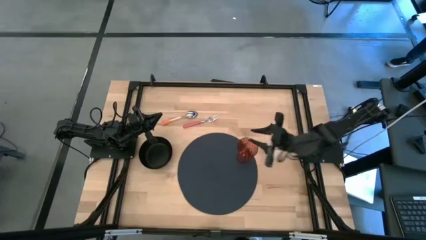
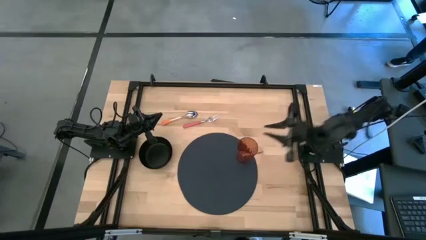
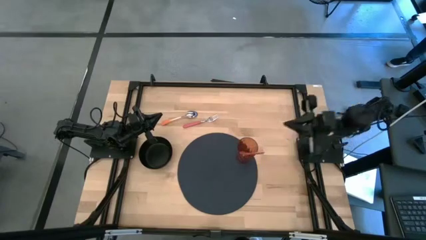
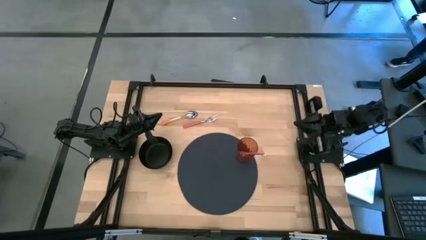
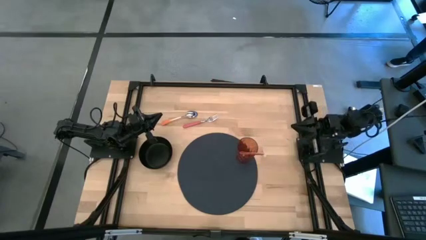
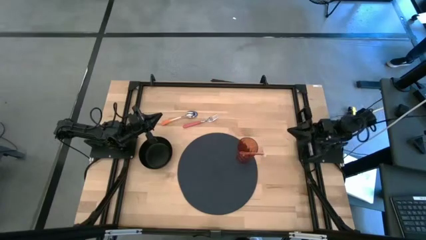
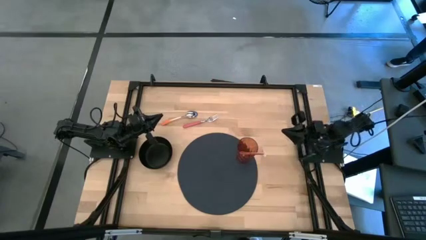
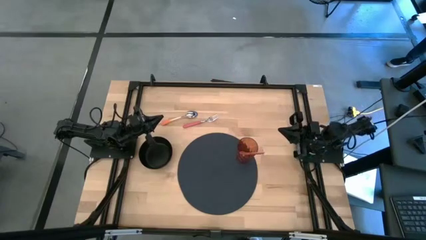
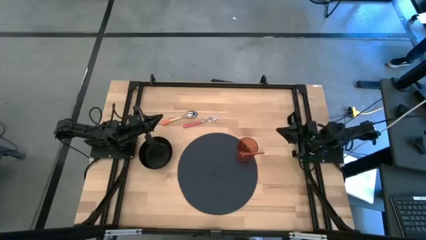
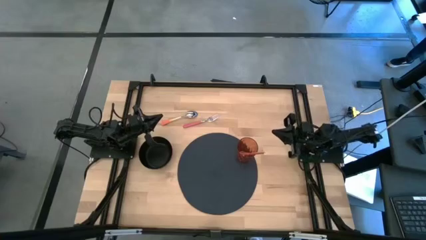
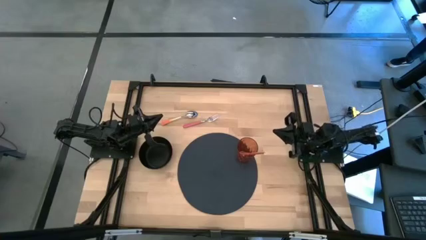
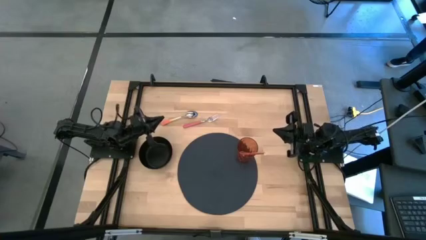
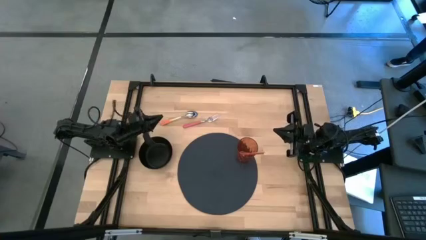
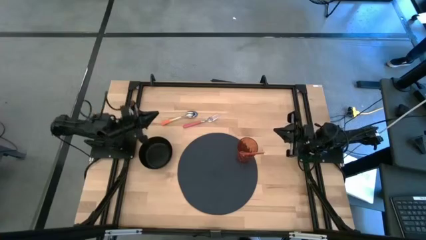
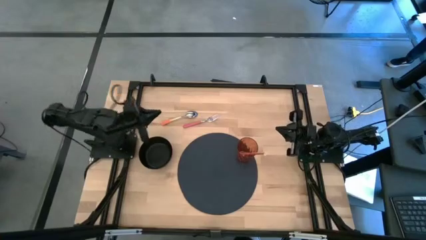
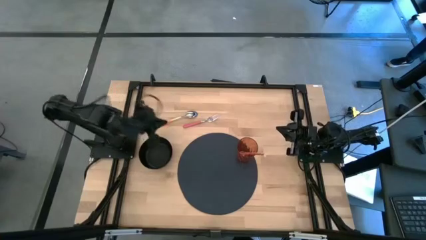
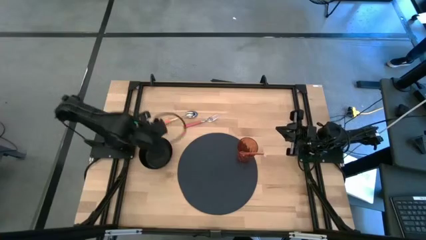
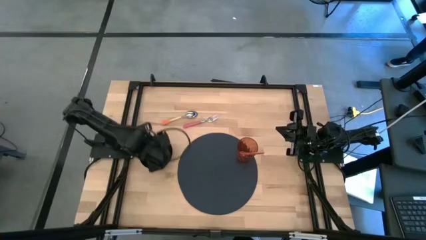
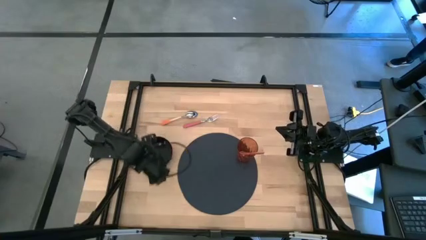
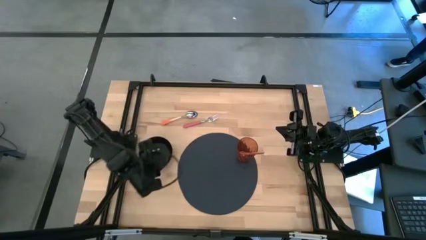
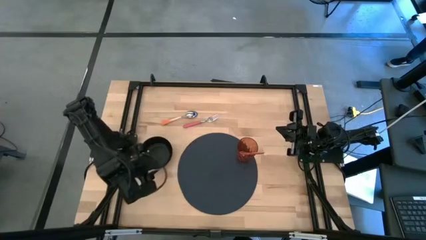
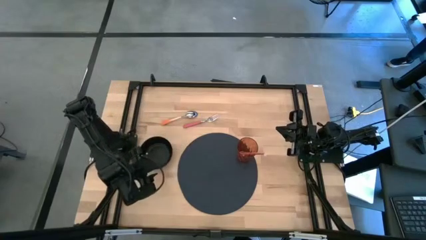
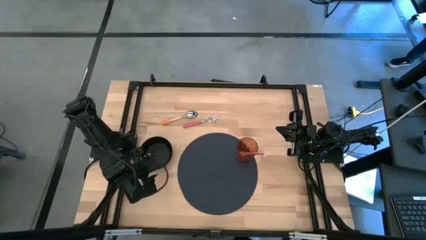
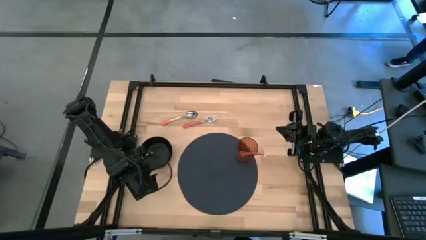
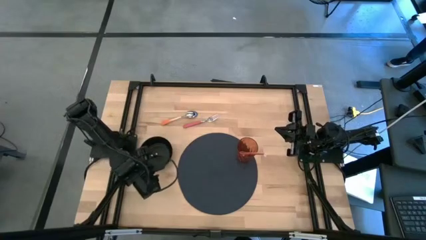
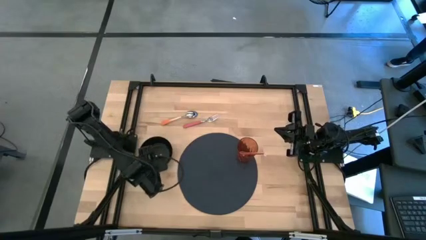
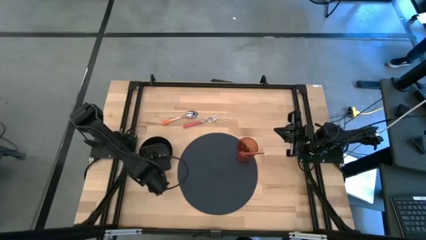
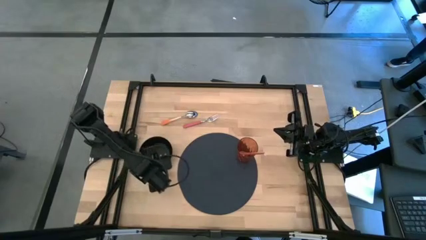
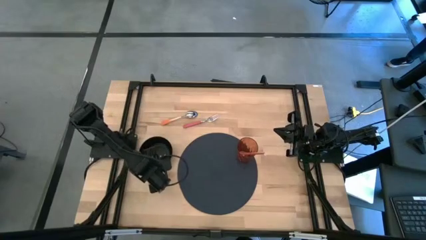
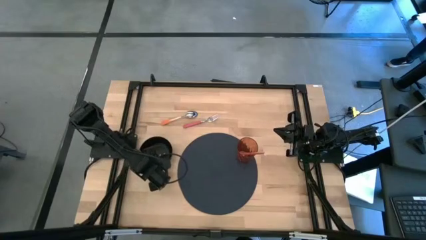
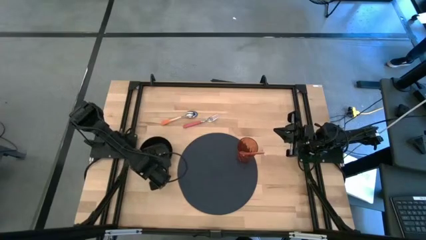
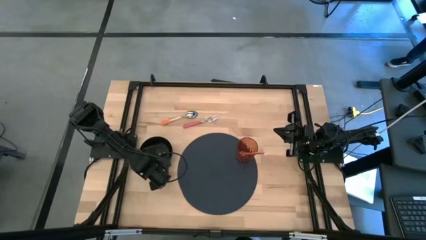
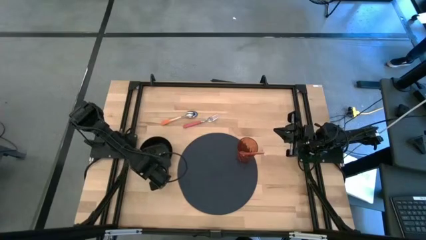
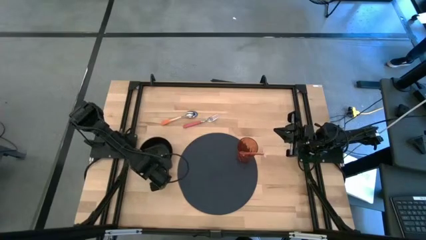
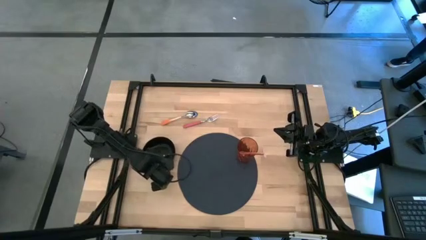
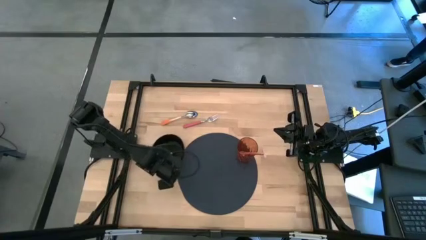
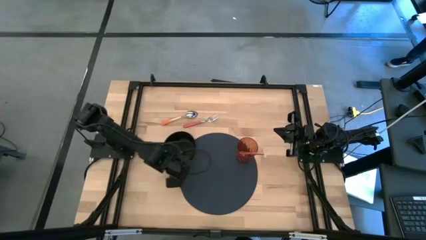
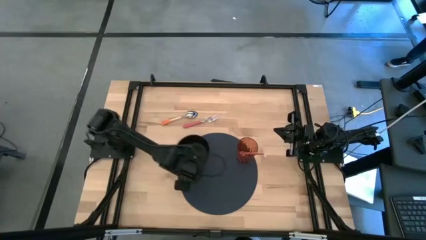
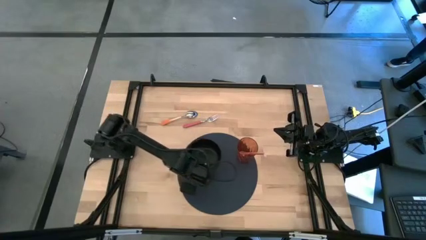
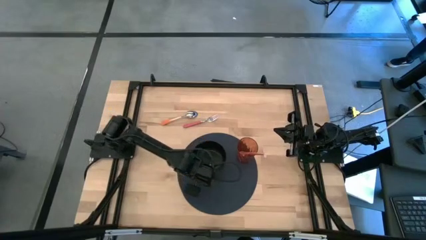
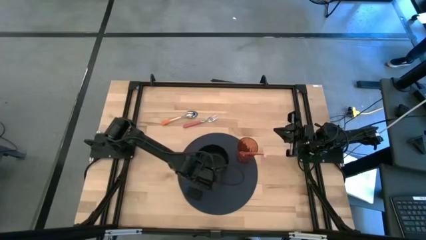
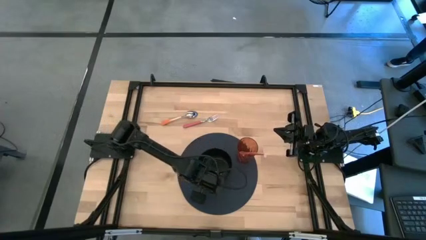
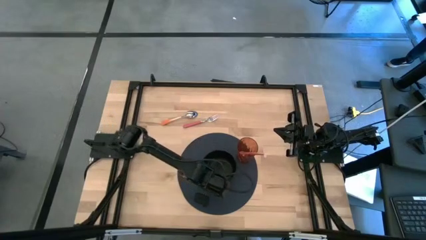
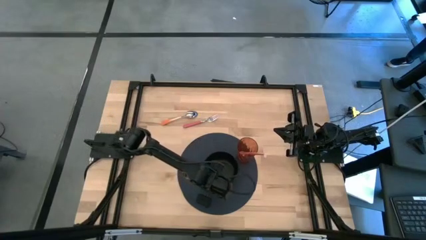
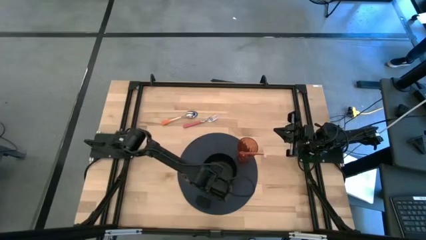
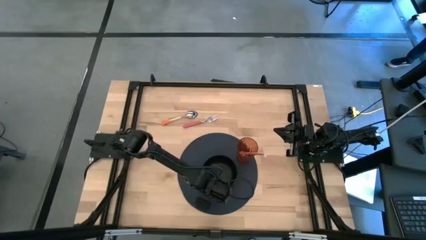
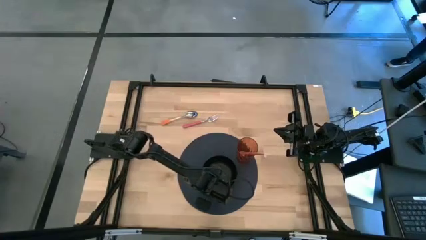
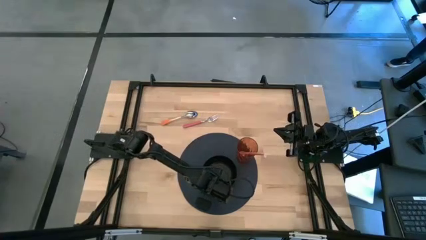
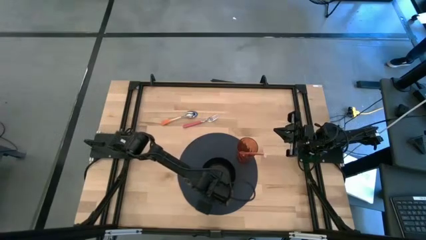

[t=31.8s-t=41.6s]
Task: Pick & Place Utensil
Put the black bowl on the dark blue mat to the left of the brown cup

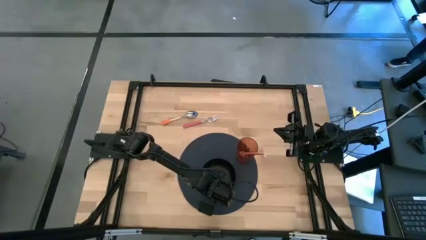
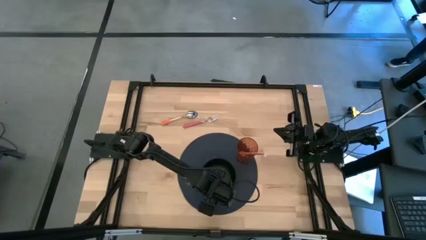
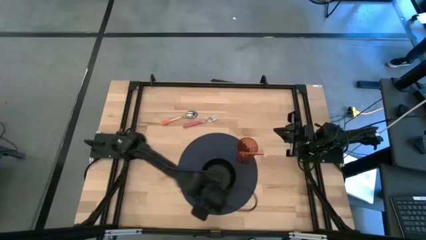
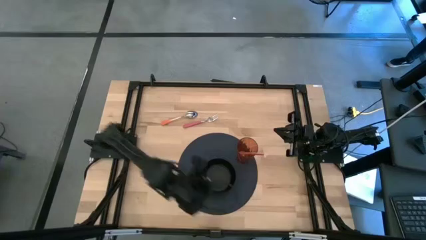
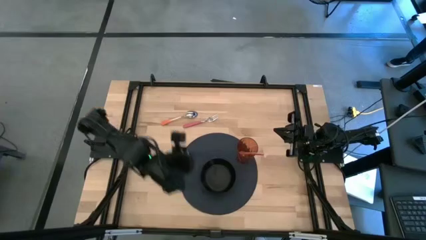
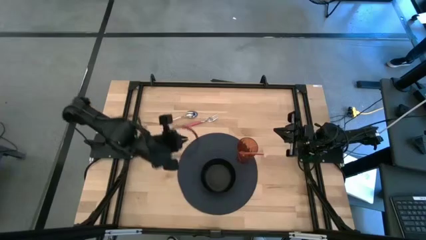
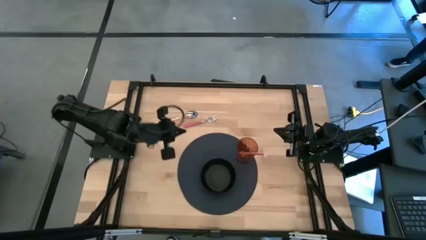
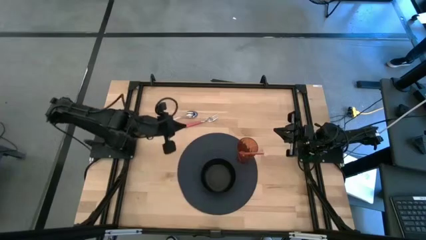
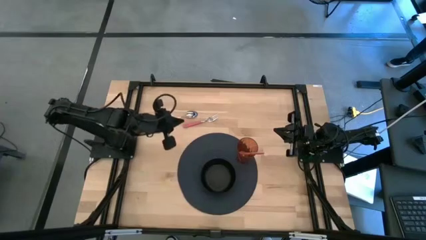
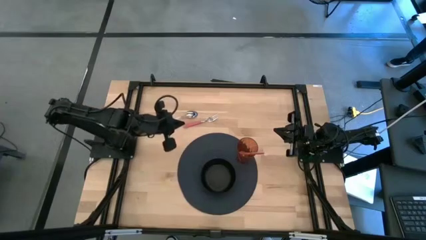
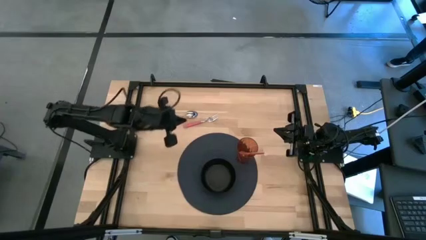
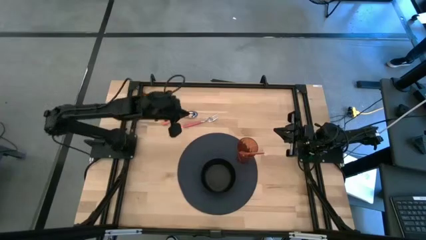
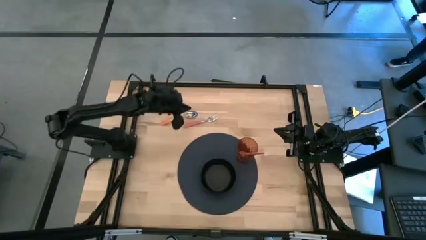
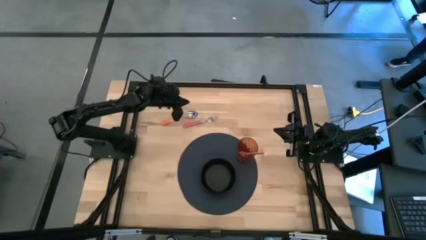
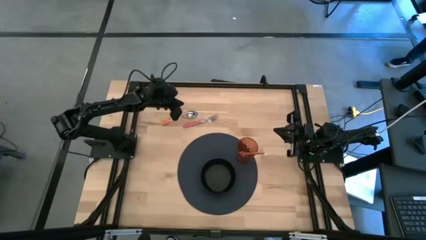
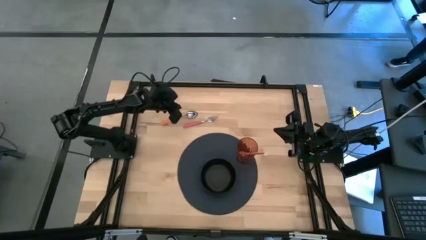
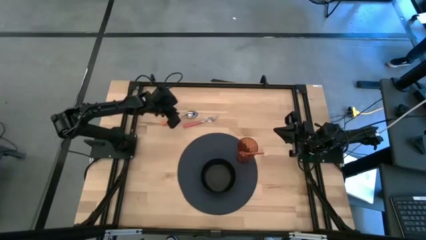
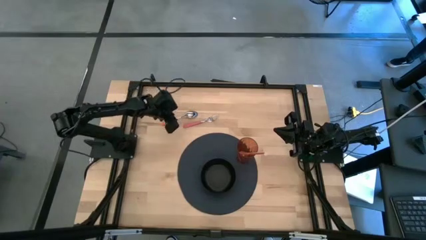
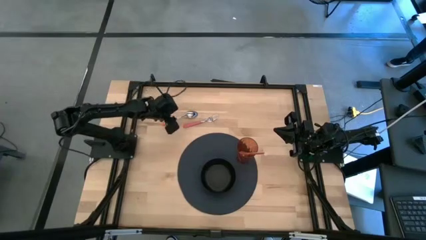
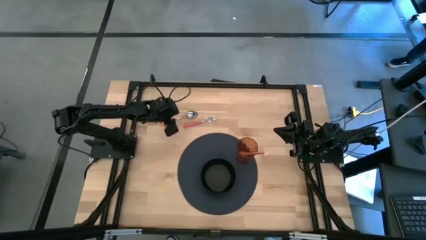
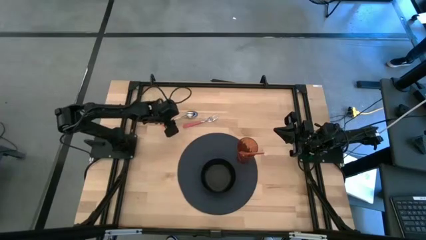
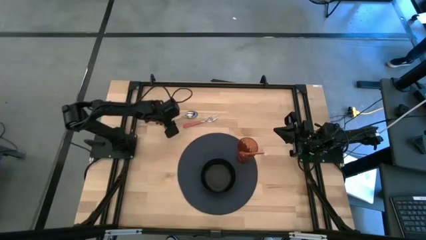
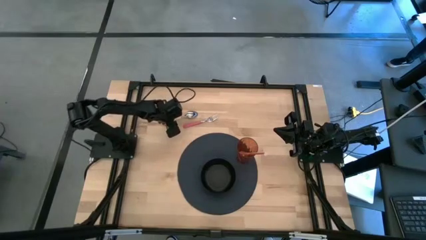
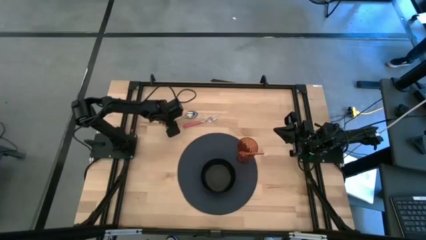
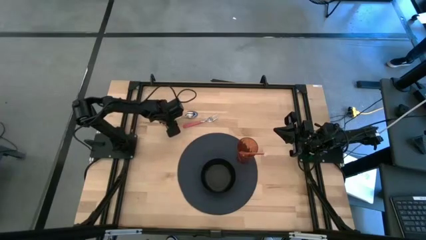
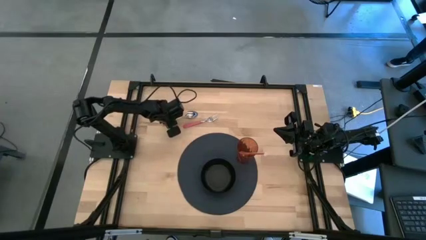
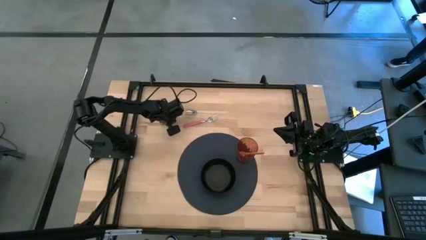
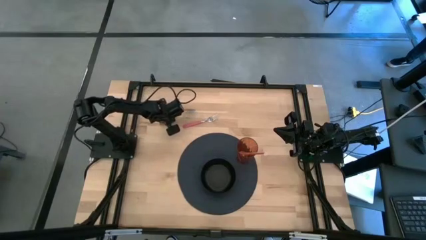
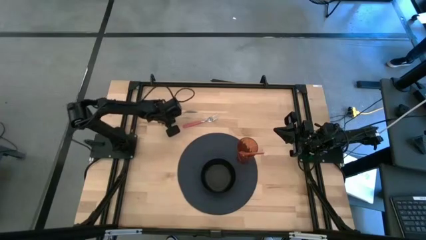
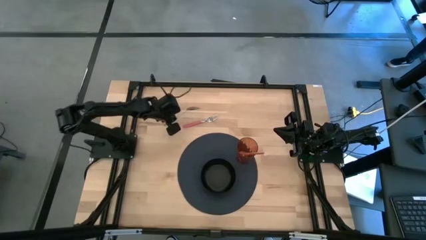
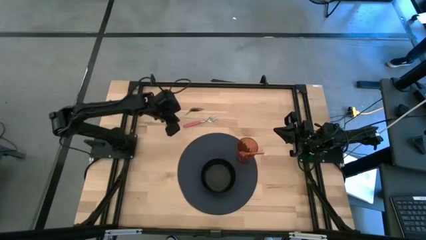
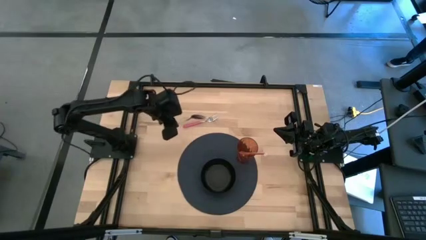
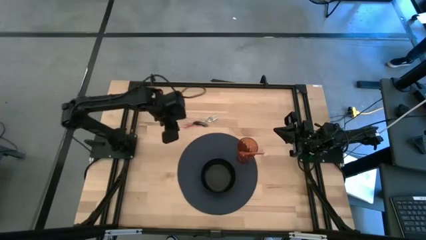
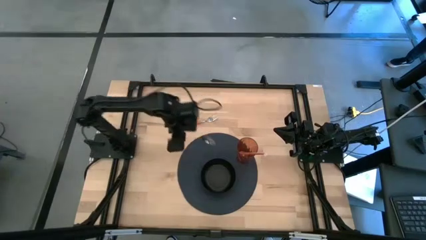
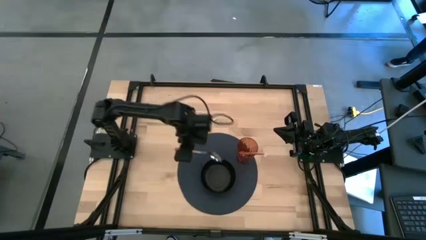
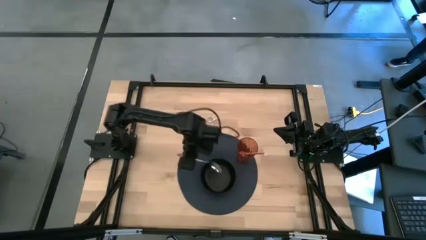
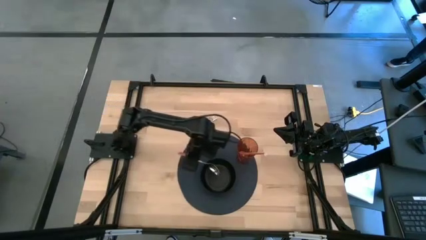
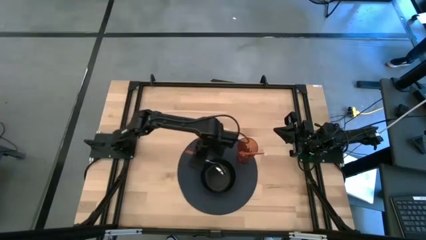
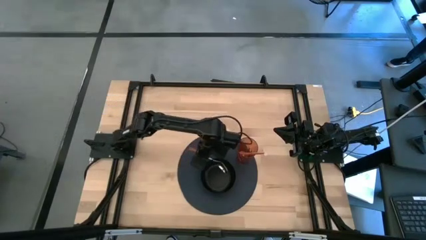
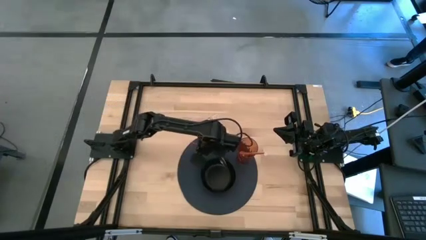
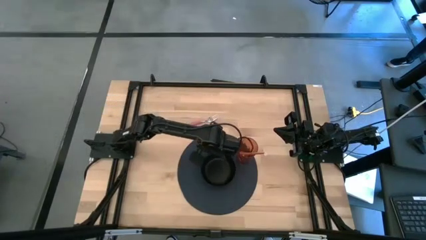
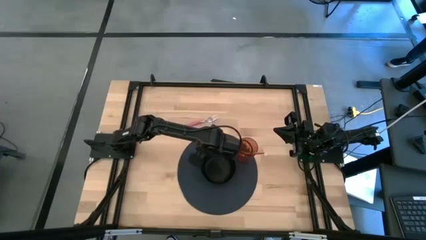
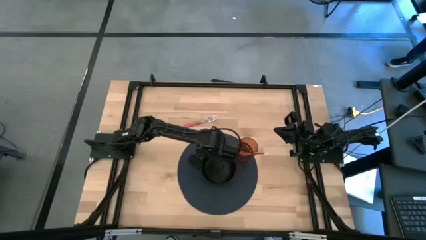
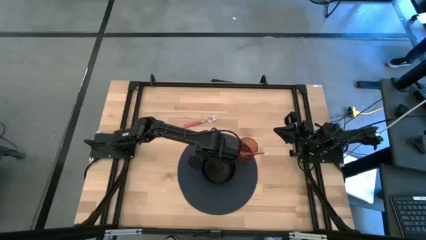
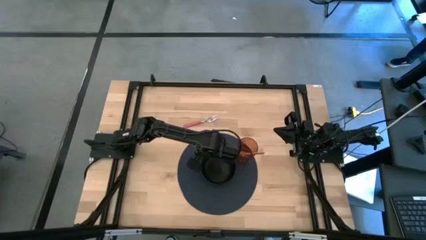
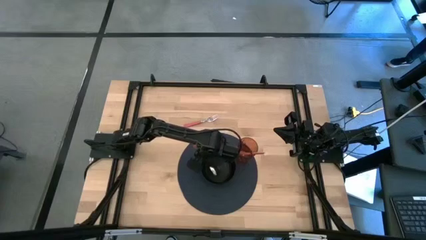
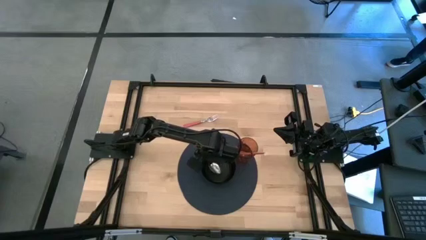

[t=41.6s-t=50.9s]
Put the orange spoon into the black bowl on the dark blue mat
